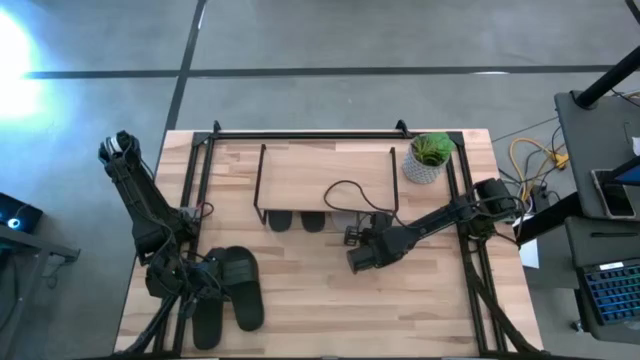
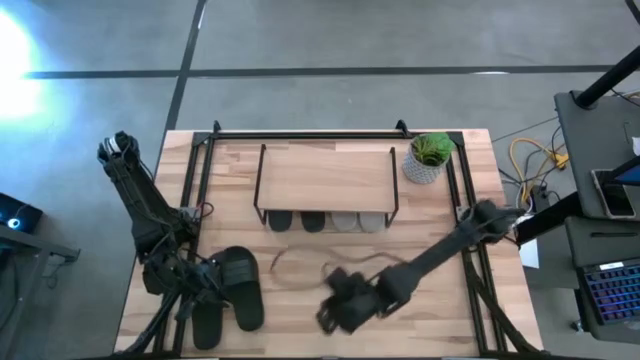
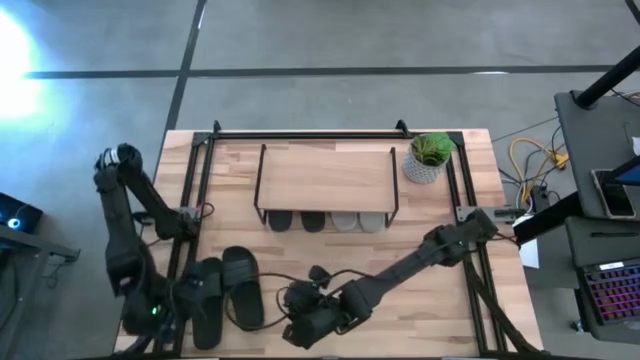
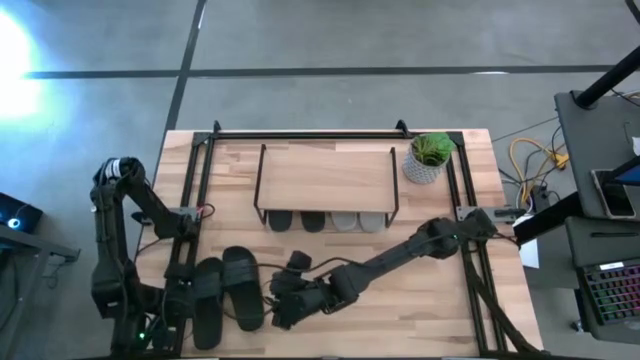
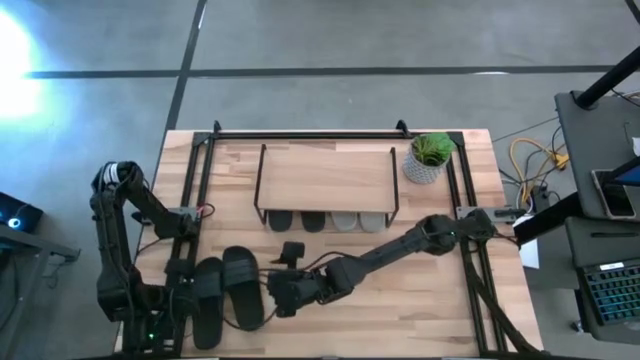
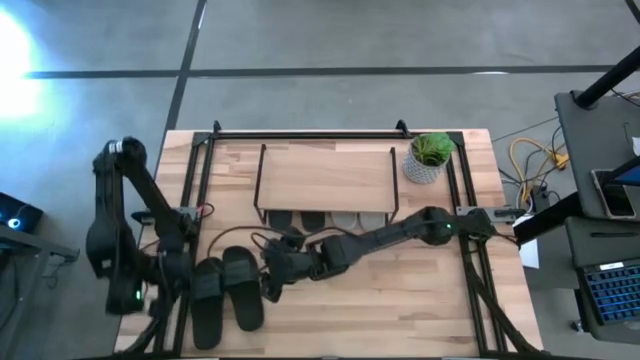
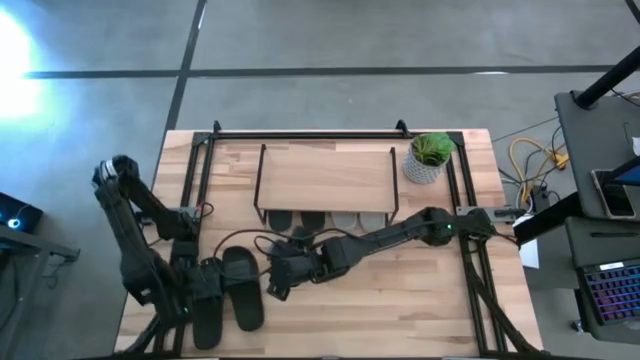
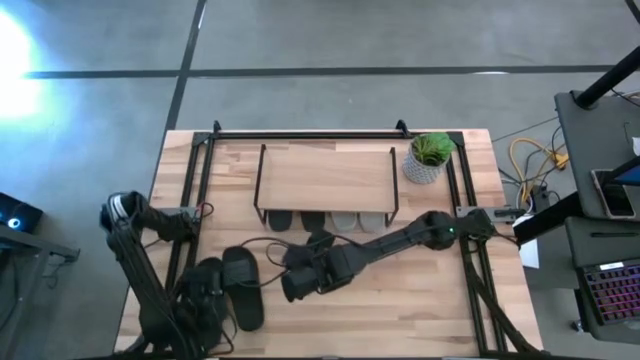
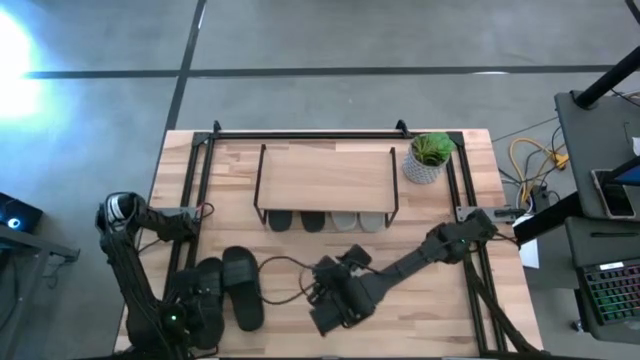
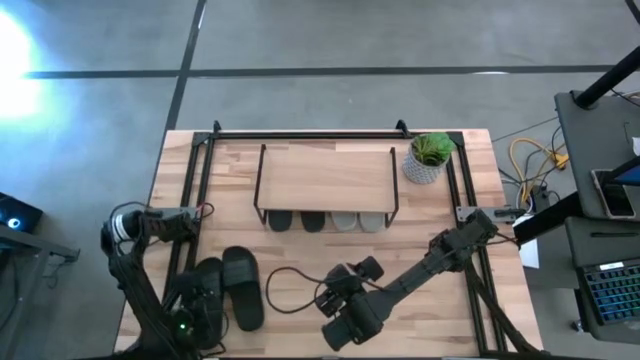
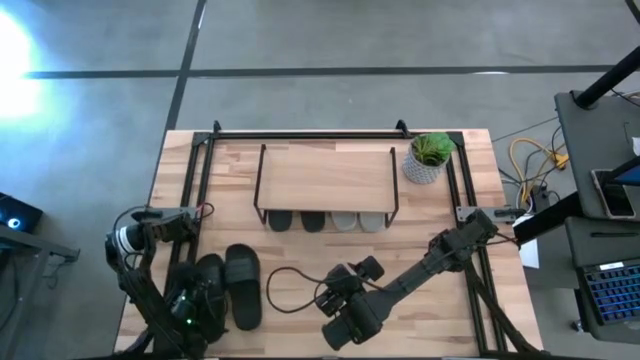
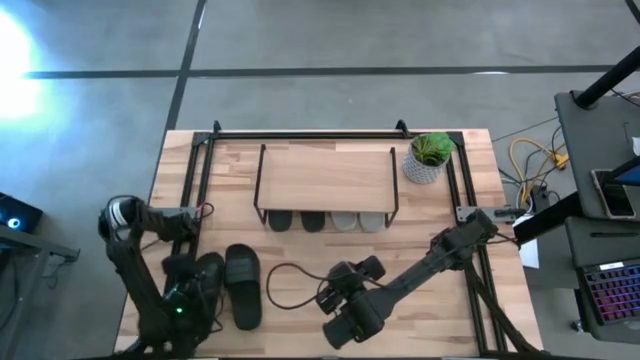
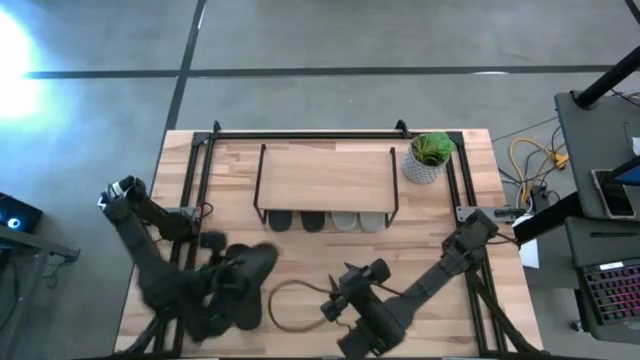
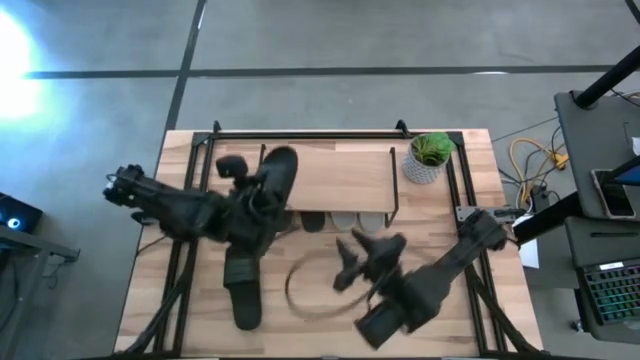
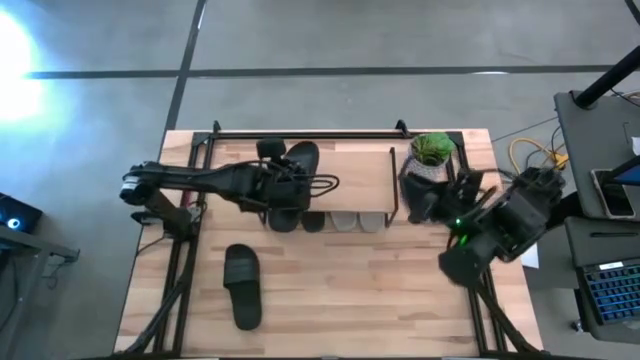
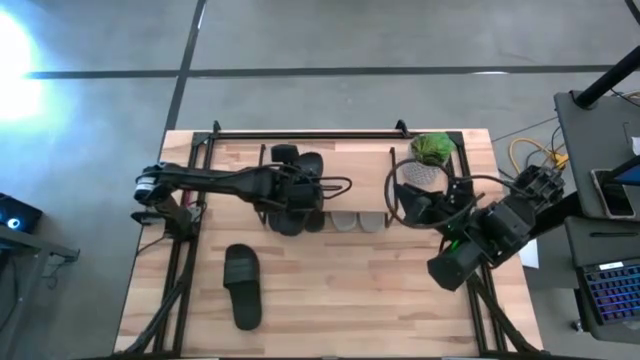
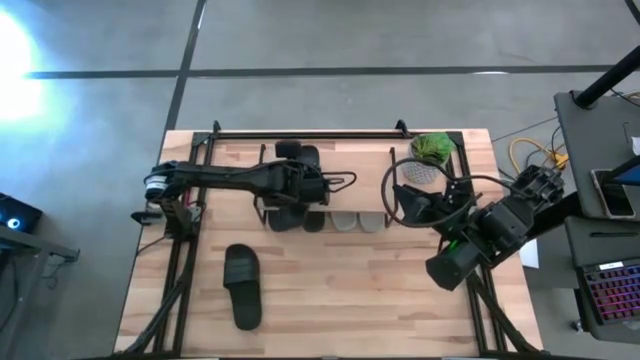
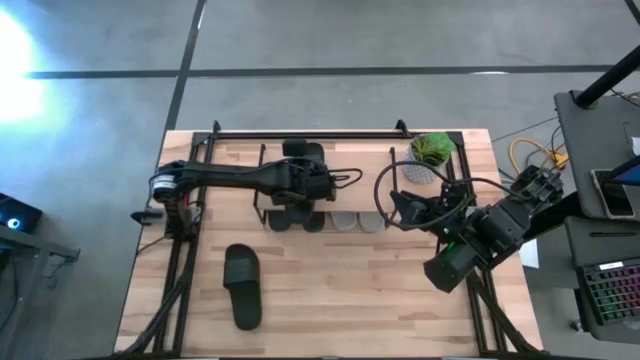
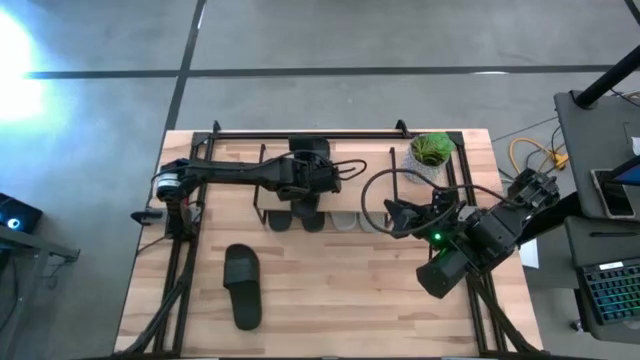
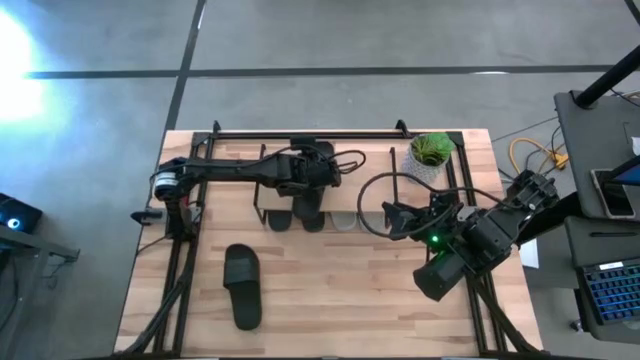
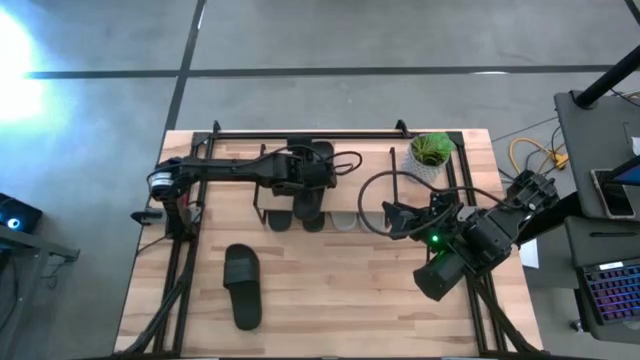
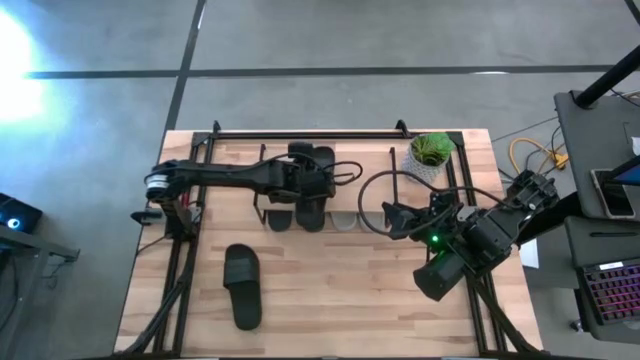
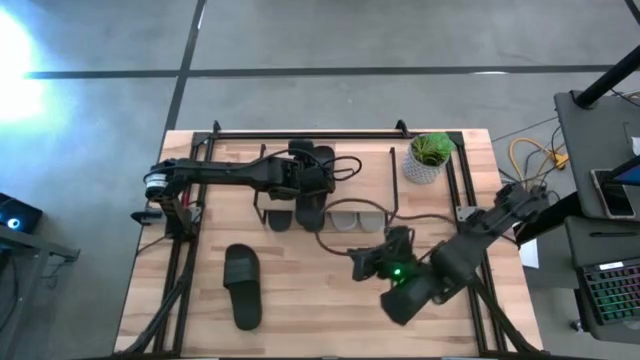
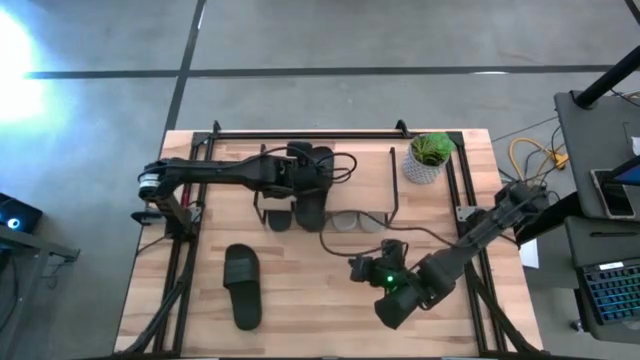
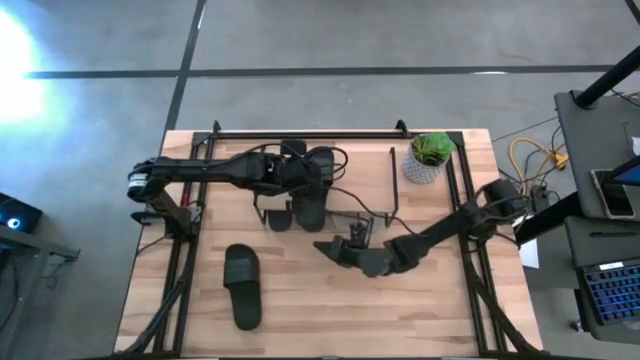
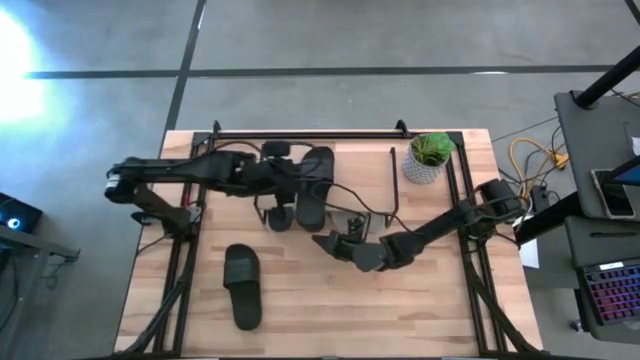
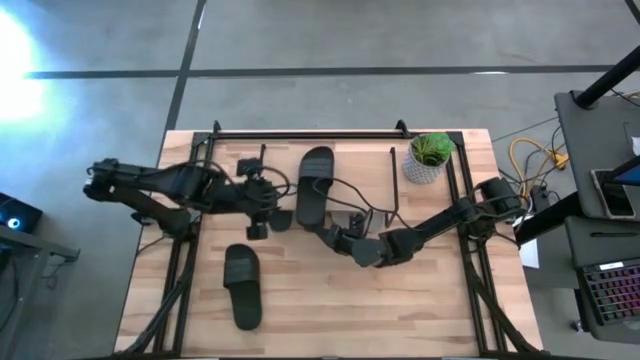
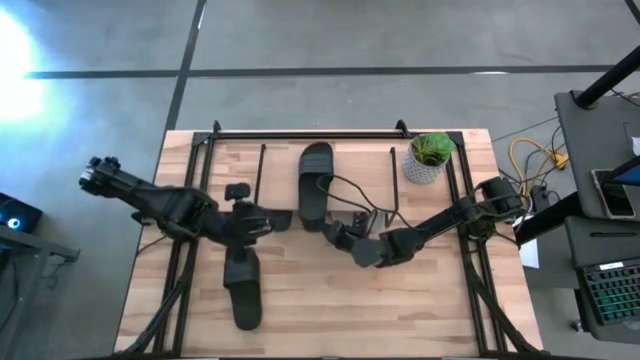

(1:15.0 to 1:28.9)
Task: Pick and place slides into the shelf
Put the black slide on the shelf

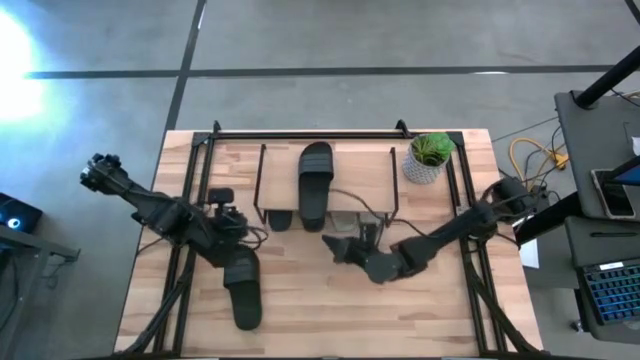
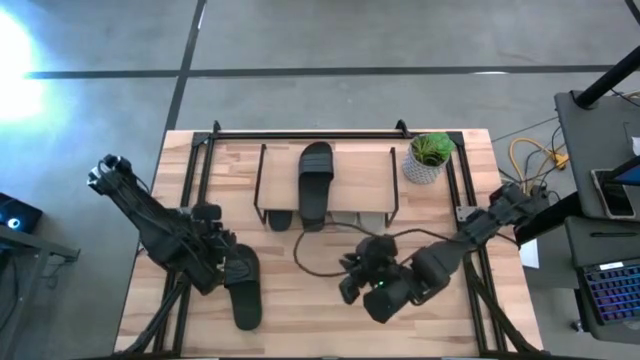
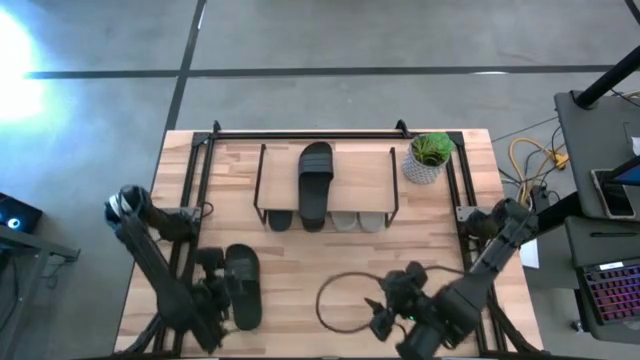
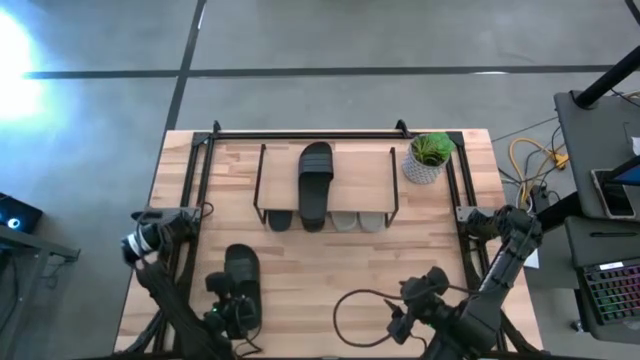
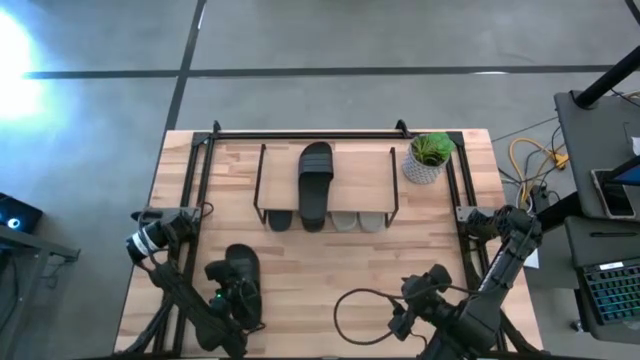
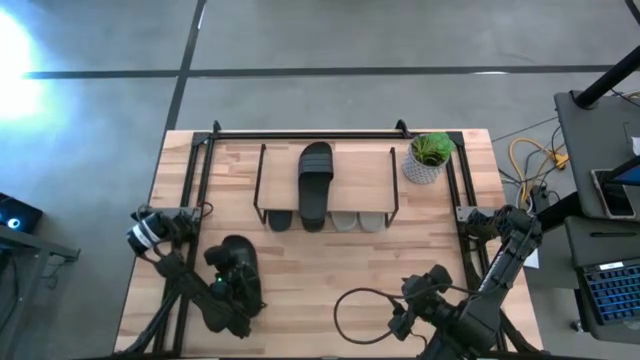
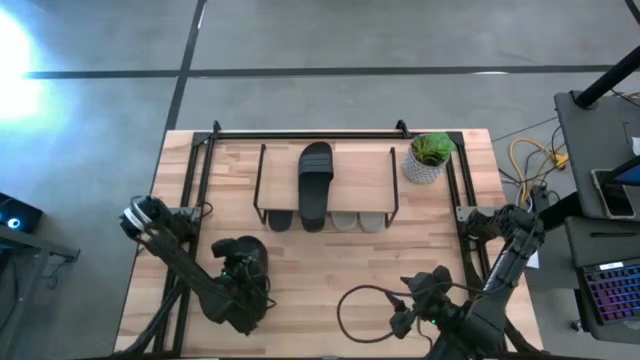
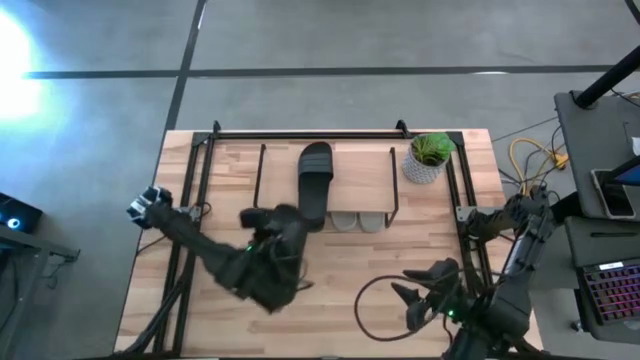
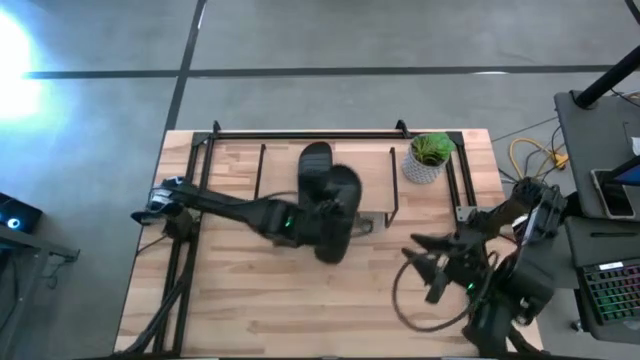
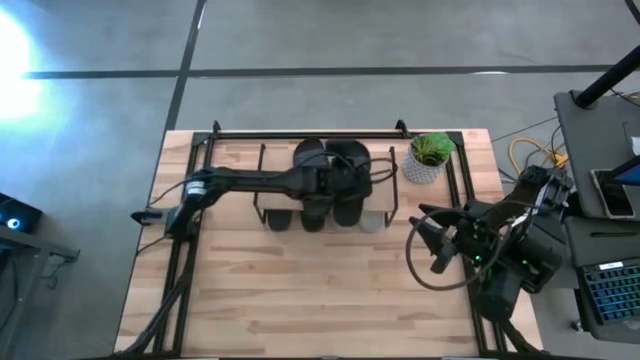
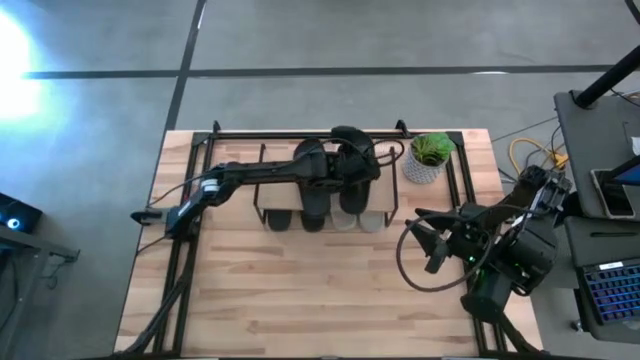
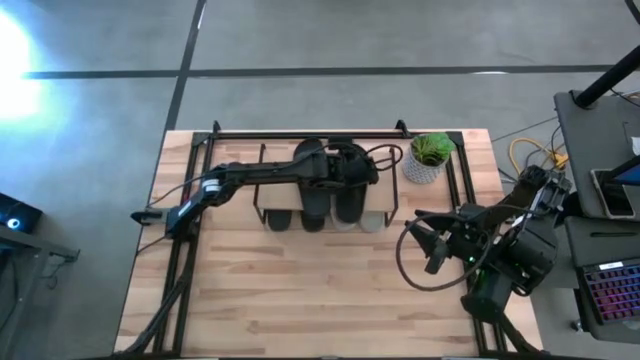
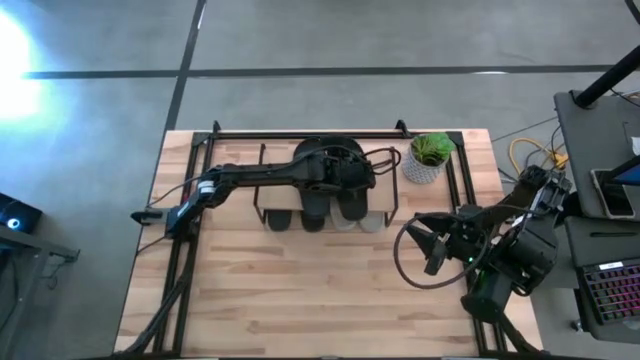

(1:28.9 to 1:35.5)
Put the black slide on the shelf

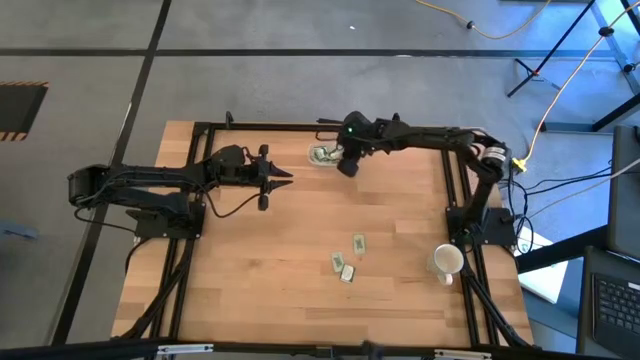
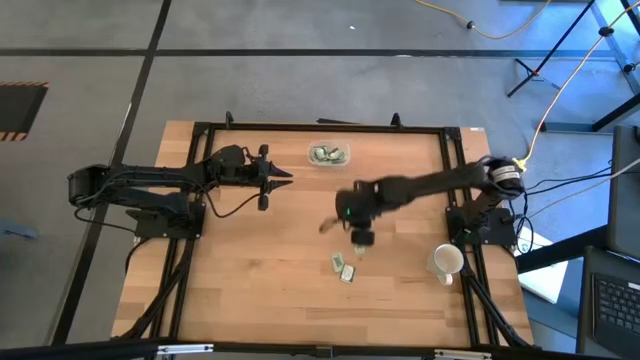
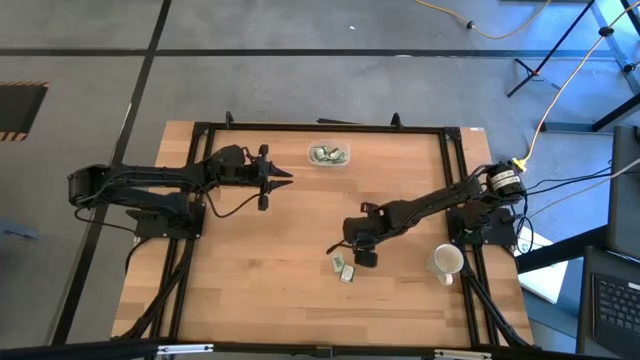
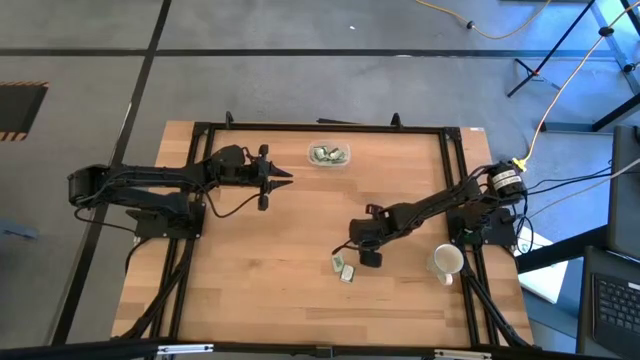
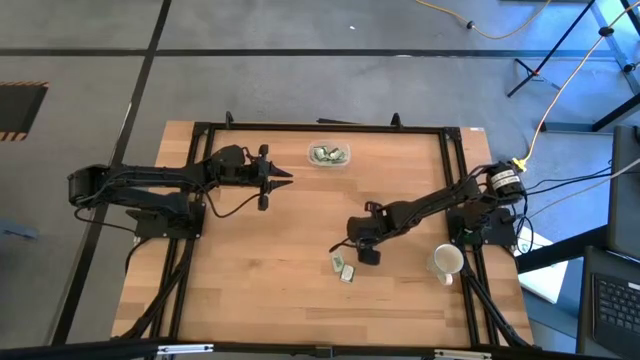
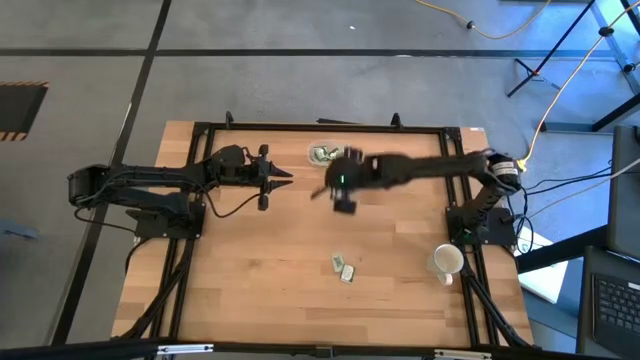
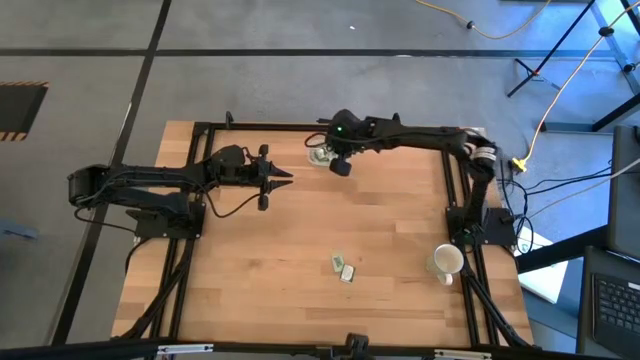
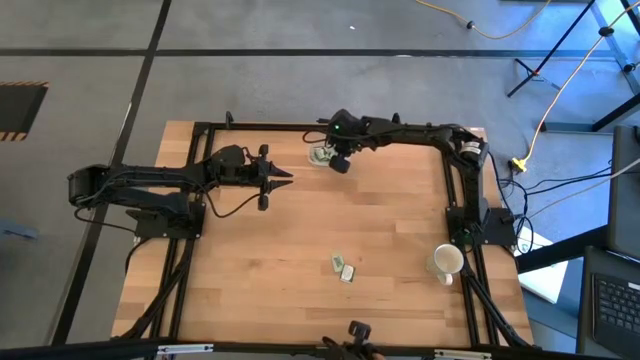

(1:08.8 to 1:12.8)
Task: Pick and place items into bin
Put the white stevia packet into the transparent bin
